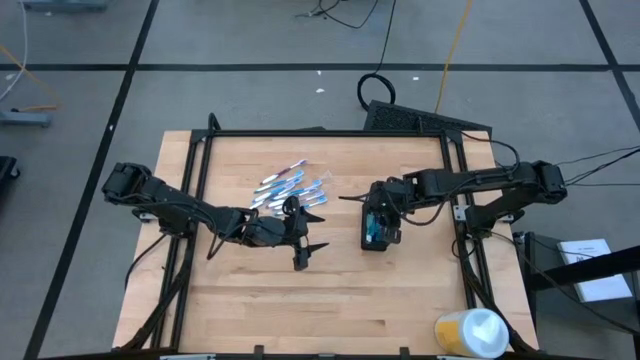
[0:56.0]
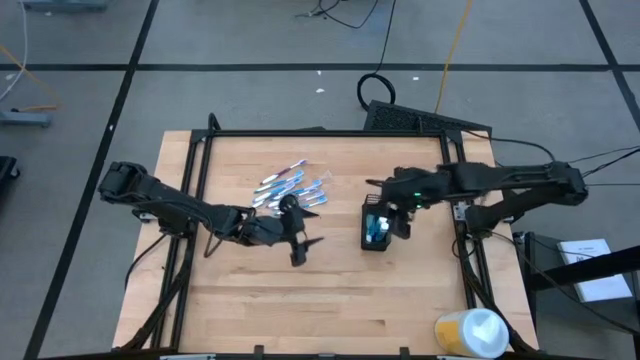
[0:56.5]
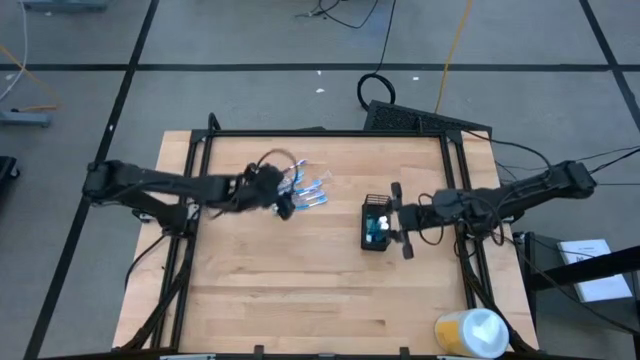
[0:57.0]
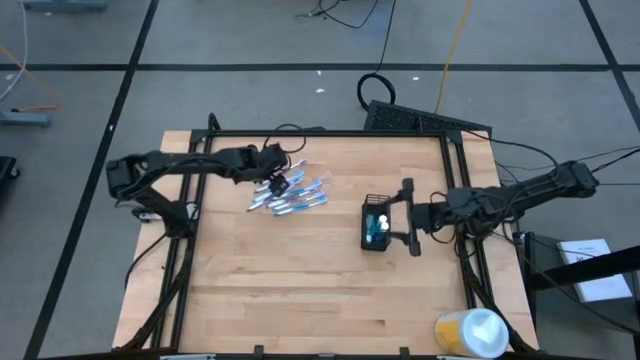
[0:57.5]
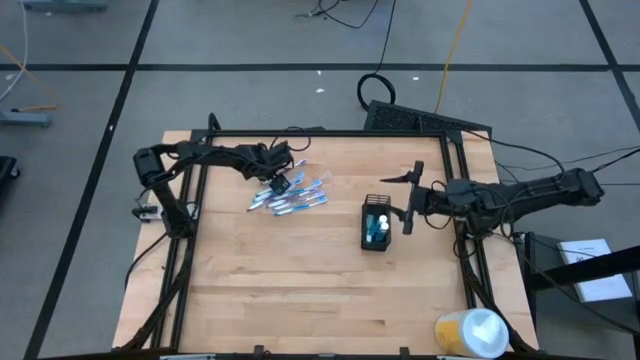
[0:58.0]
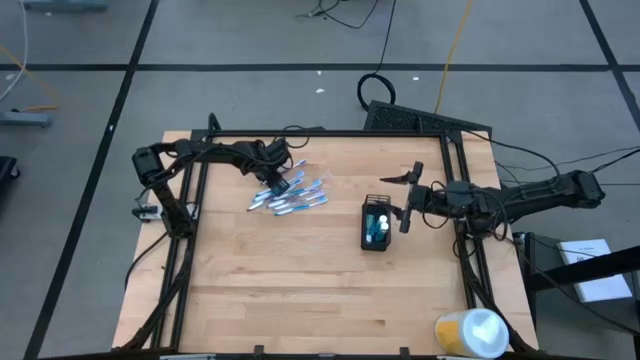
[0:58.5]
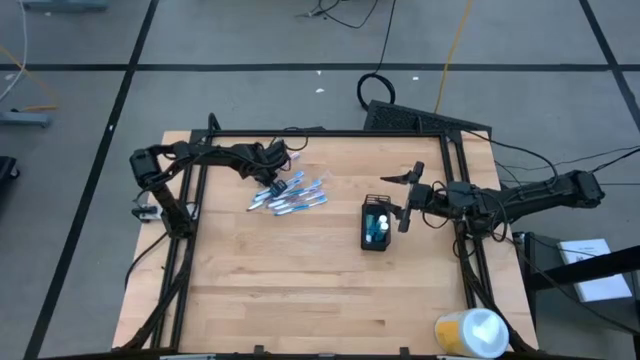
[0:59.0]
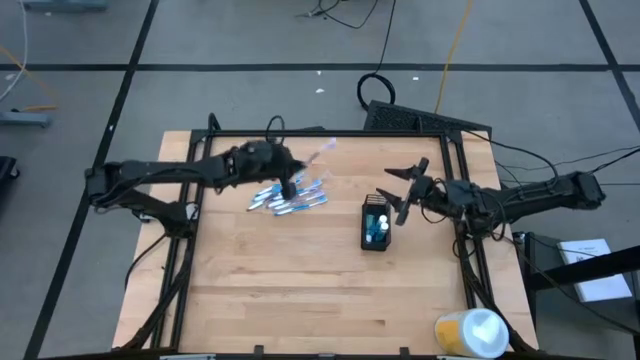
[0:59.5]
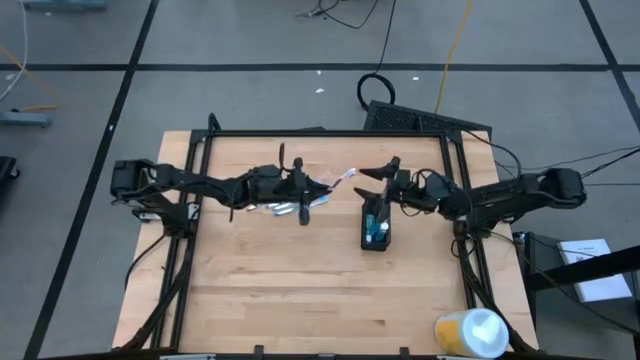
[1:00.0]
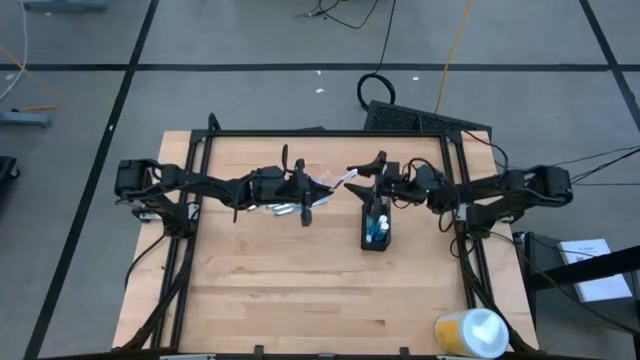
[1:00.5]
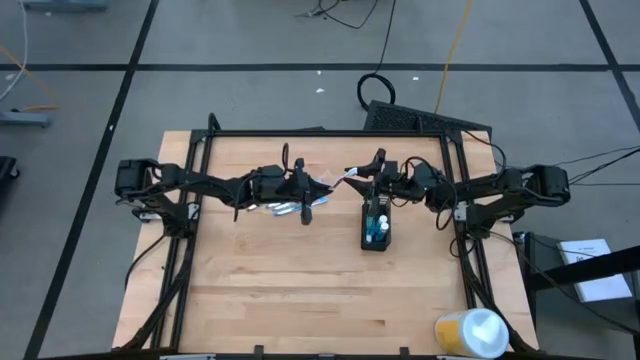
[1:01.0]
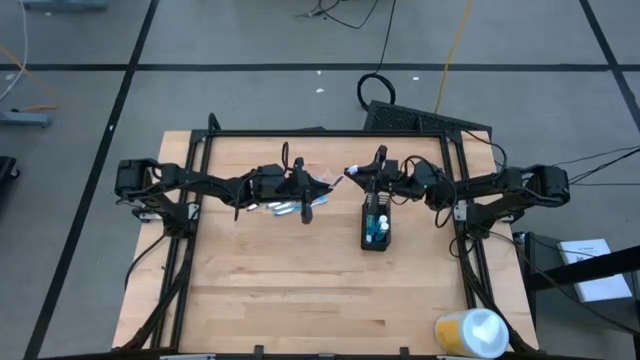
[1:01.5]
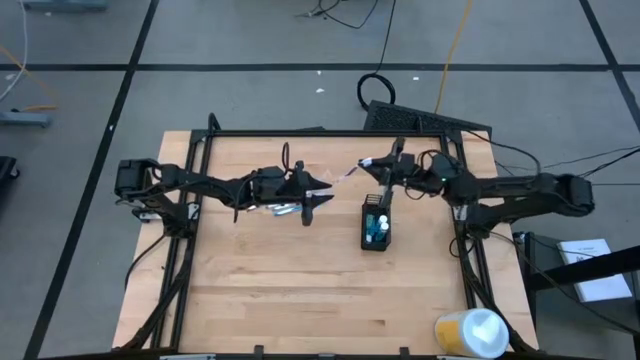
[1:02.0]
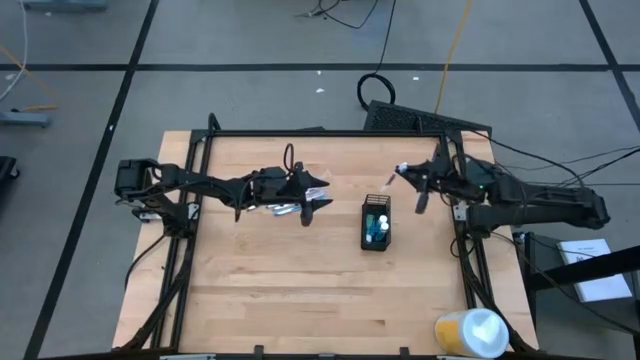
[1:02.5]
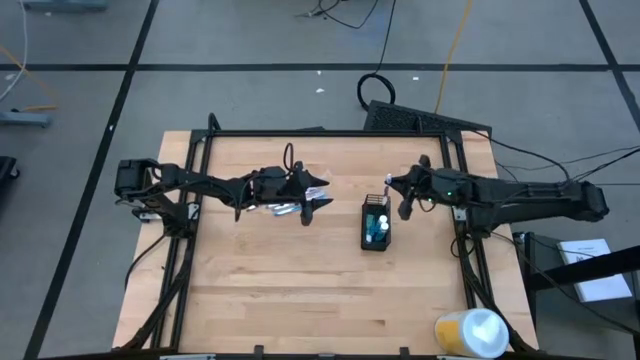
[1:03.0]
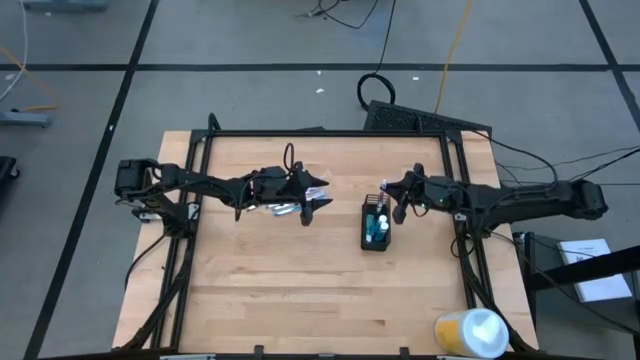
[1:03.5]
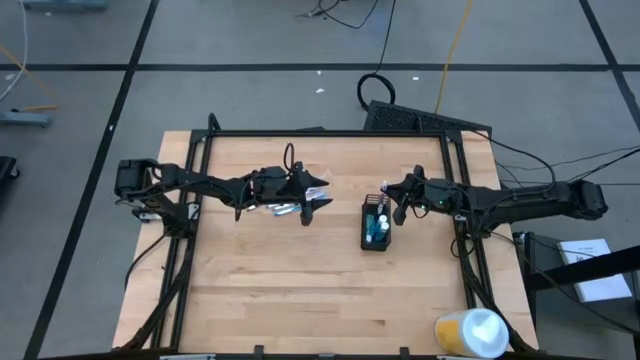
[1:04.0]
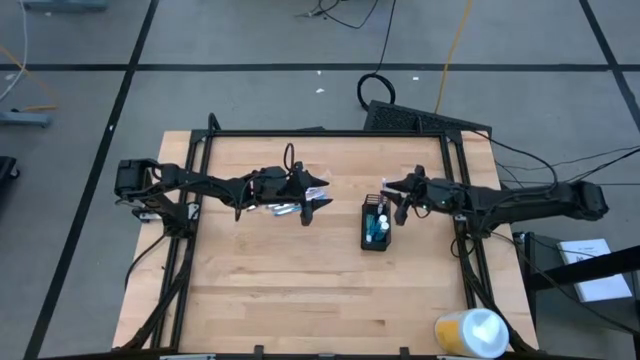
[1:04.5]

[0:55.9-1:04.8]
Task: Pick & Place toothbrushing station
Put the purple toothbrush into the top section of the mesh organizer

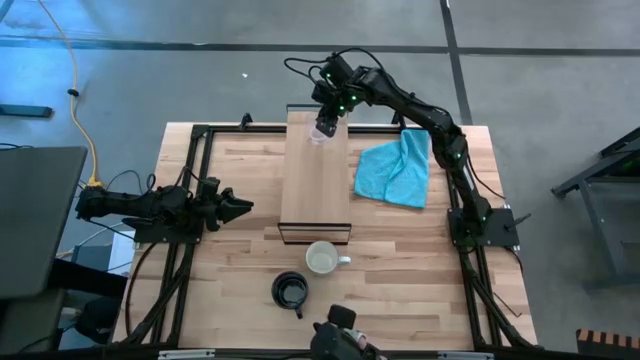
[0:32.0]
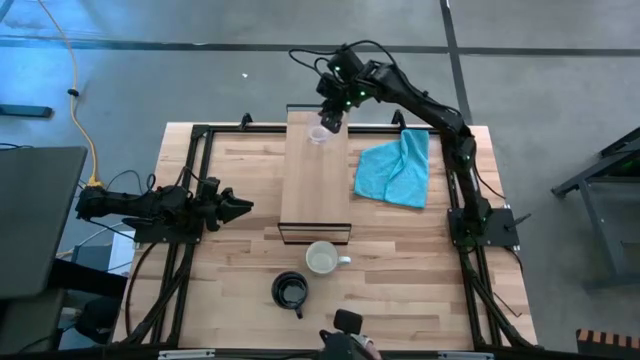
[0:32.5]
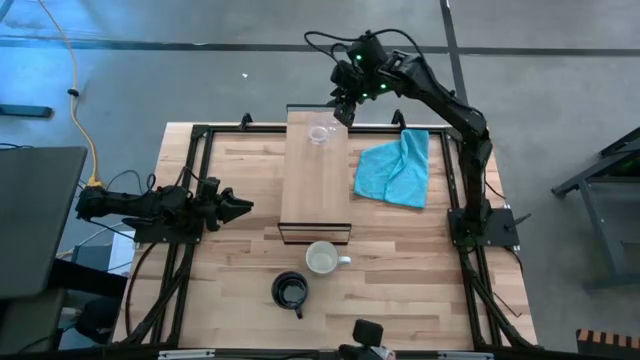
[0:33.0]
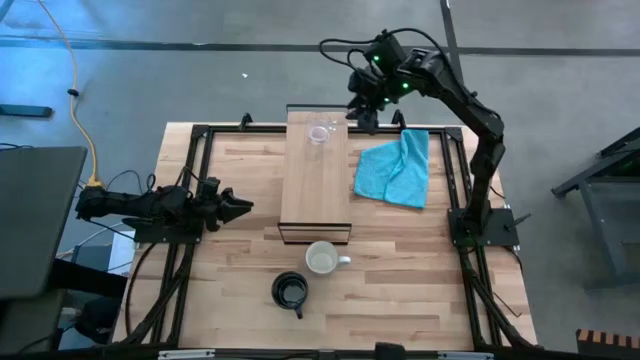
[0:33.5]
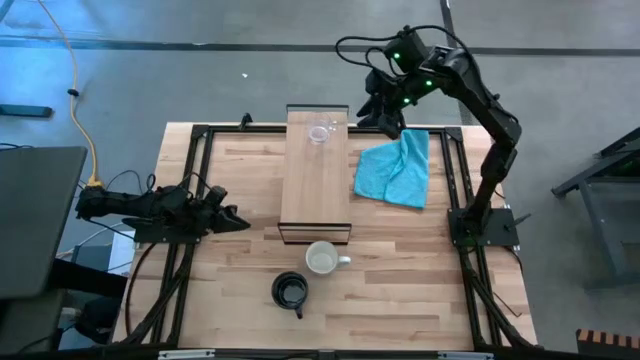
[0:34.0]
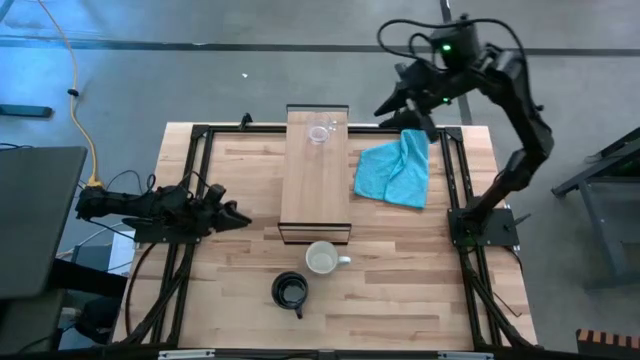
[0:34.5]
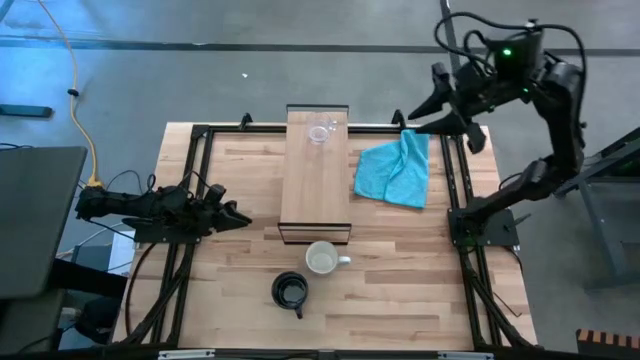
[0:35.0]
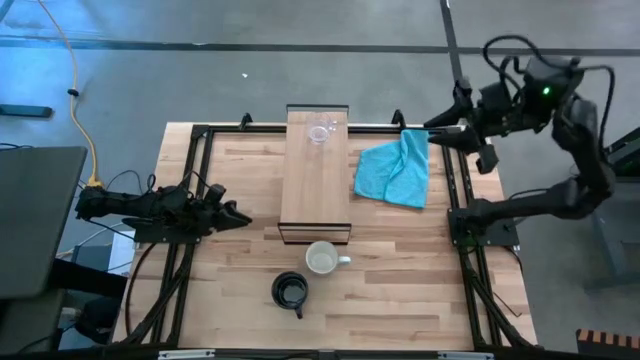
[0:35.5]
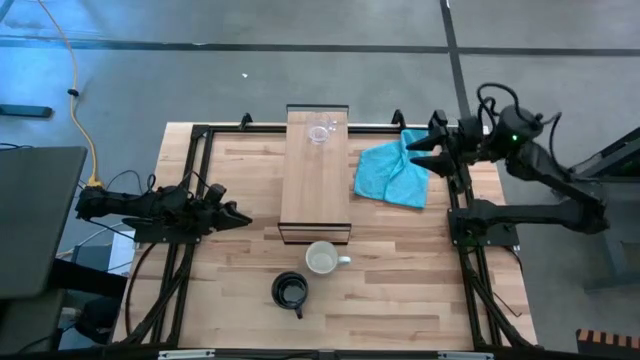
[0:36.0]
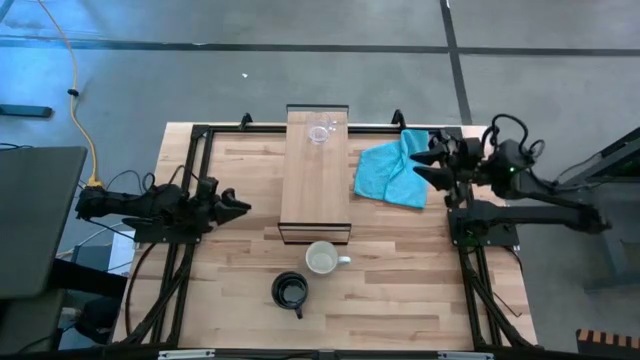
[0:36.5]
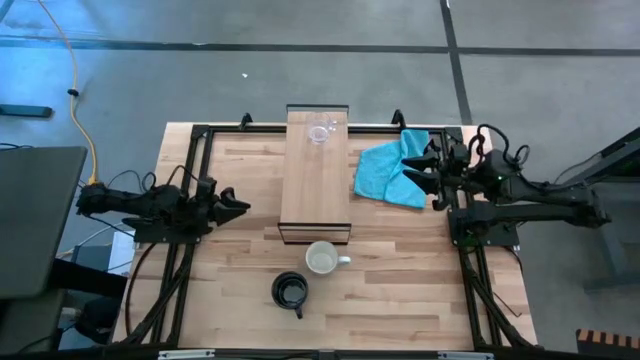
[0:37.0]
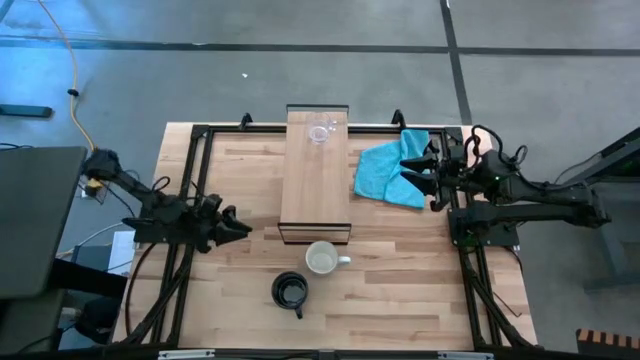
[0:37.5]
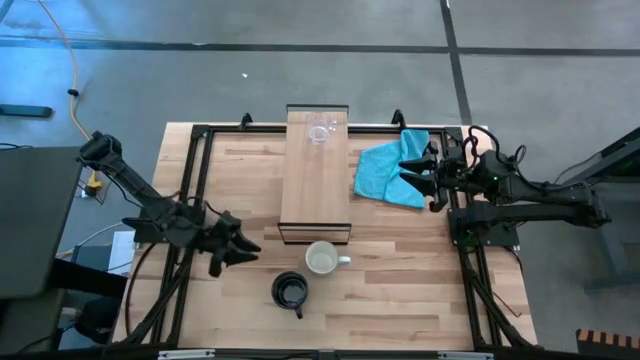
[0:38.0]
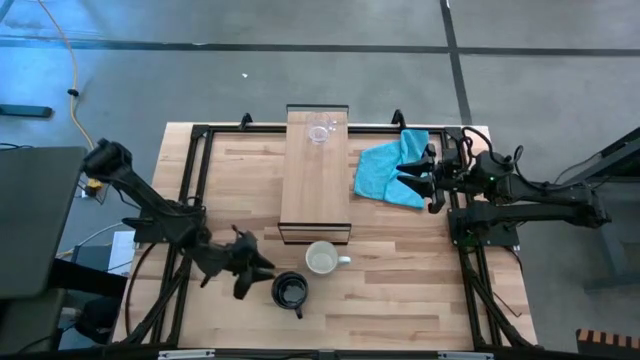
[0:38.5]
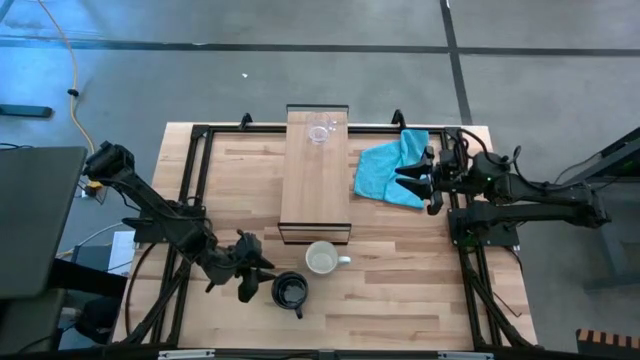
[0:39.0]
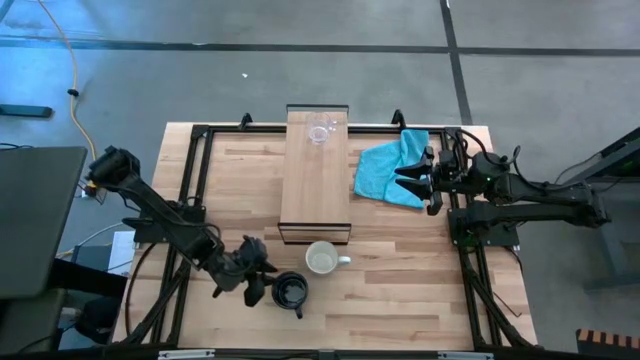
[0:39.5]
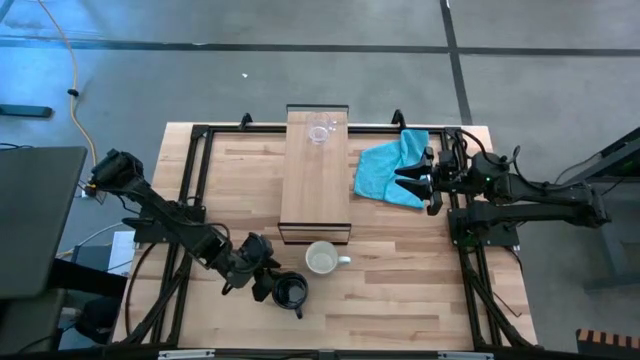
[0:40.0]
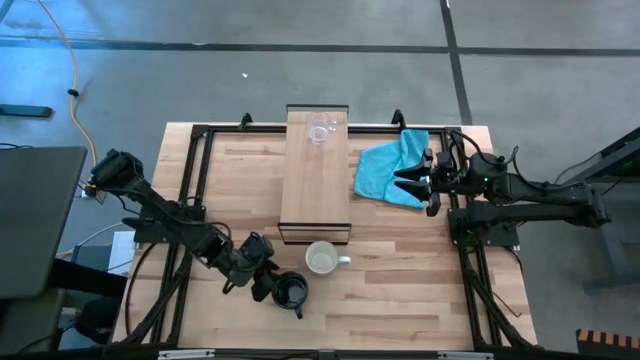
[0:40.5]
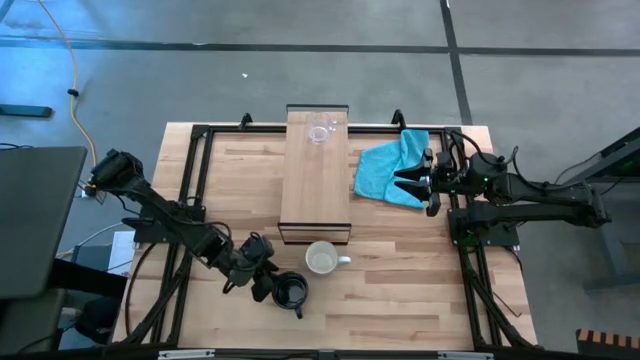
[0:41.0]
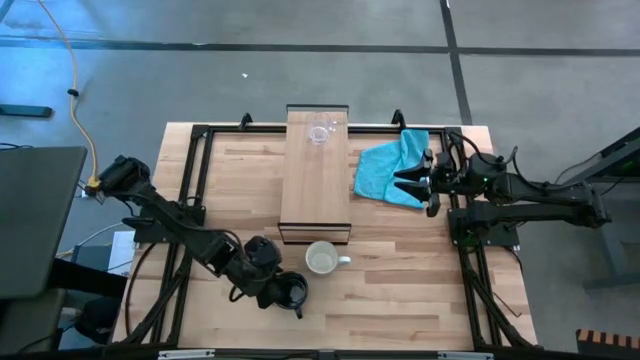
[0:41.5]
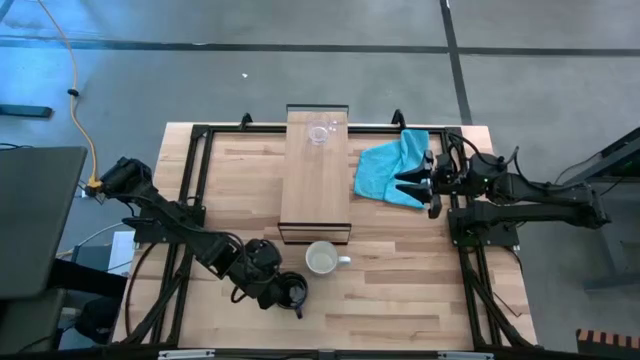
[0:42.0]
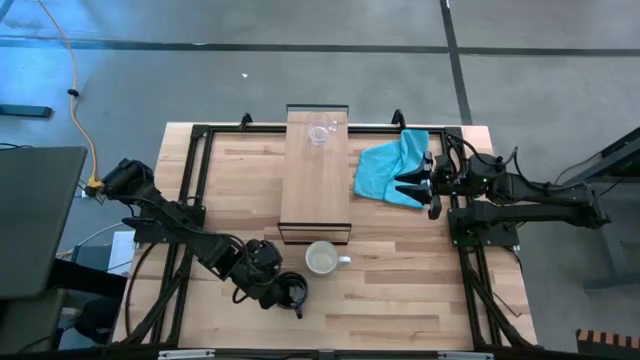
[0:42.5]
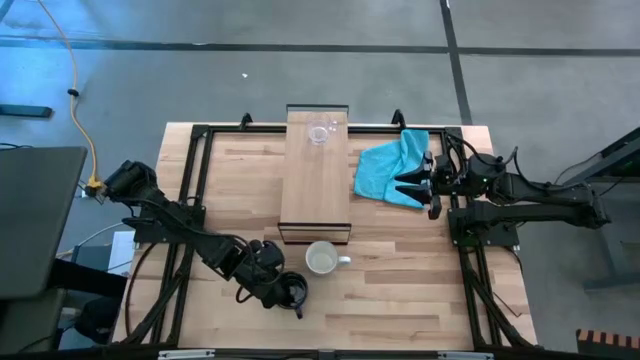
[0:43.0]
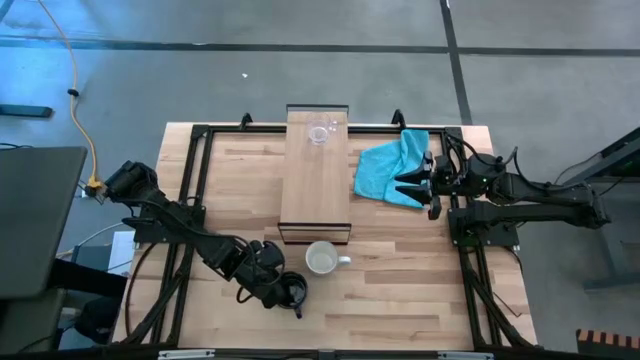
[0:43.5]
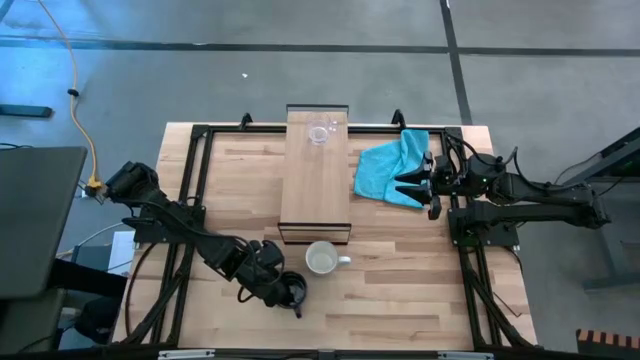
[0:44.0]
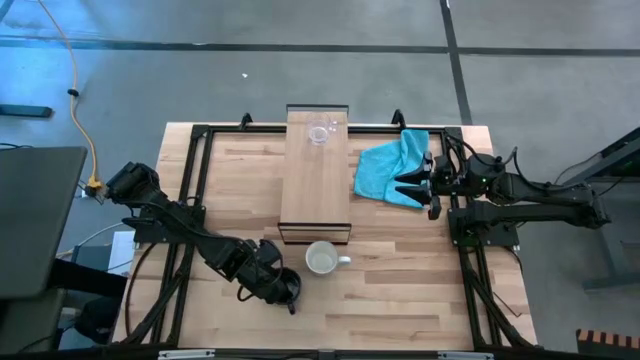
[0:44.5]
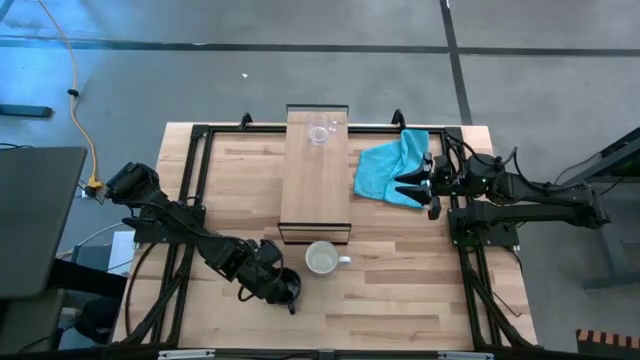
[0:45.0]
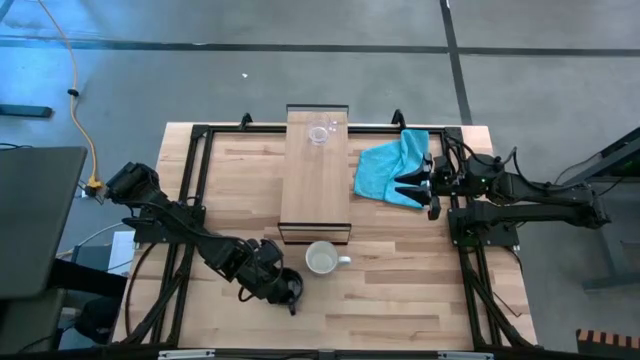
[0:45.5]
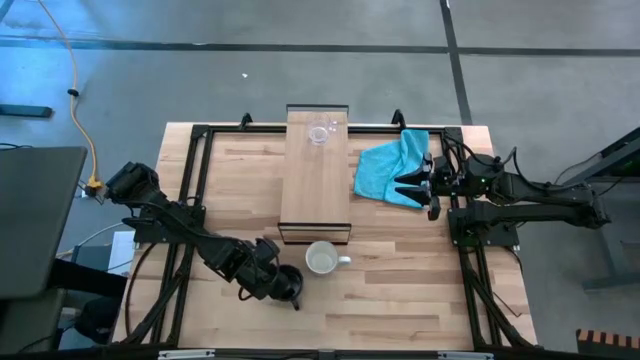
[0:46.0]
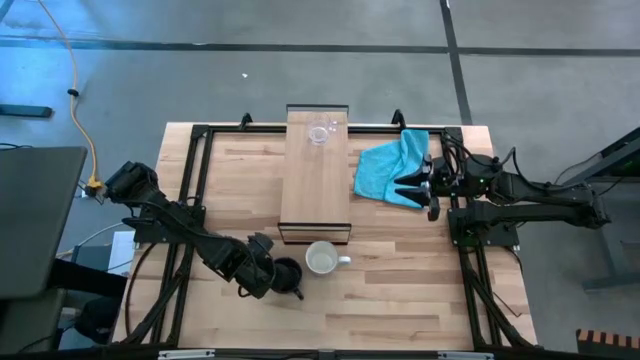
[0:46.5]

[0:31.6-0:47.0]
Task: Stack small to large cups/mugs on shelf
Put the dark blue mug on the shelf
